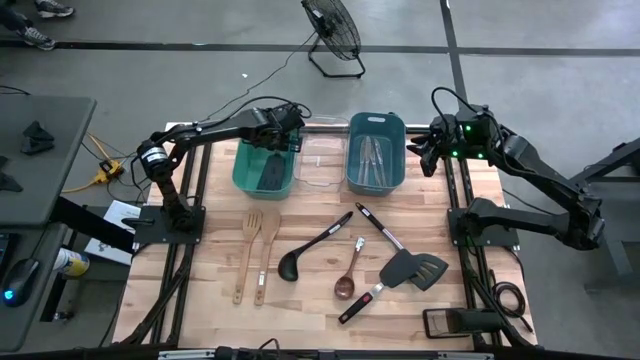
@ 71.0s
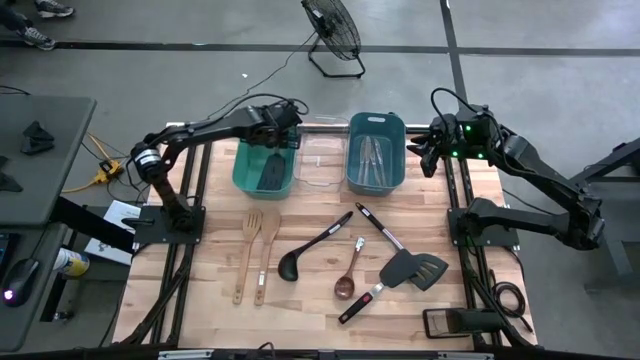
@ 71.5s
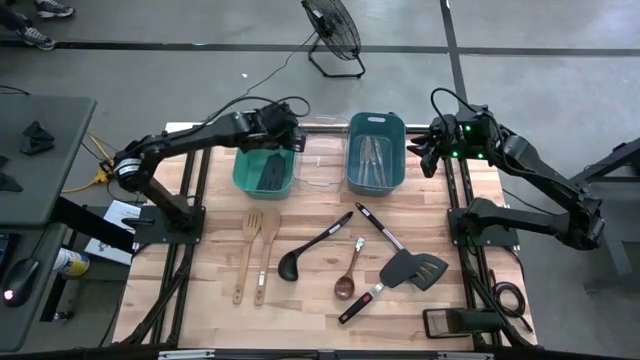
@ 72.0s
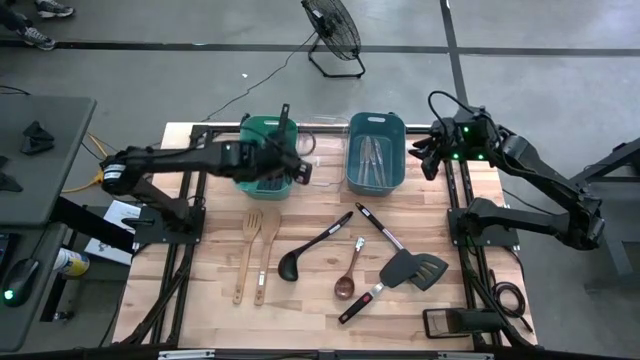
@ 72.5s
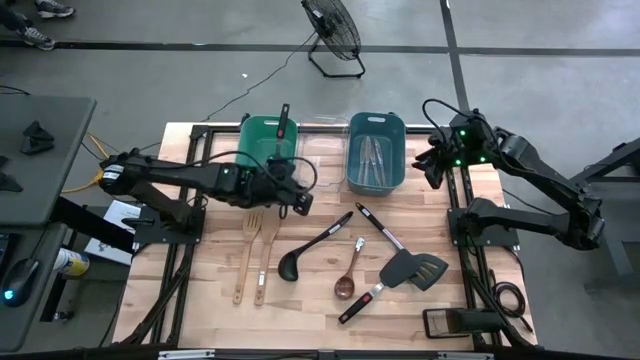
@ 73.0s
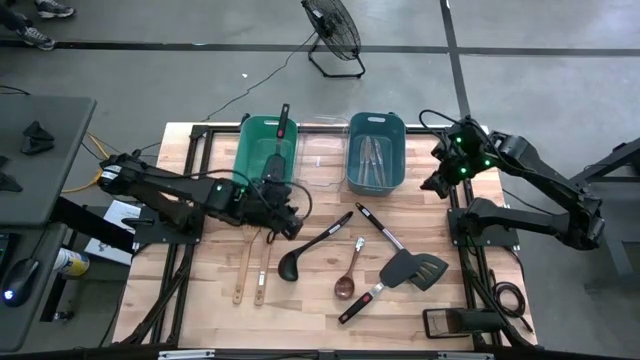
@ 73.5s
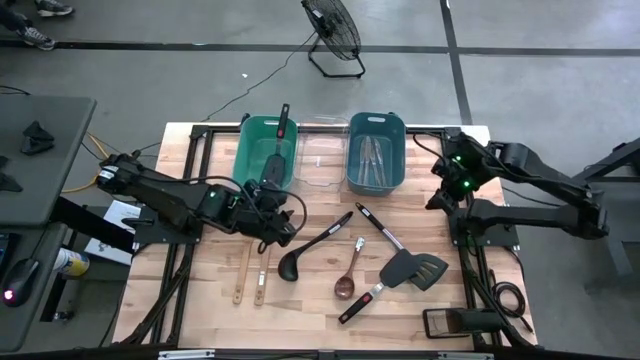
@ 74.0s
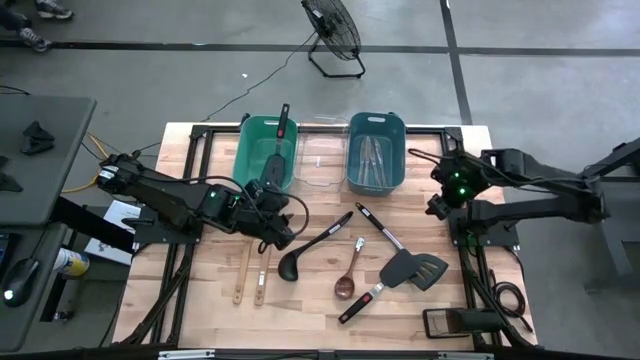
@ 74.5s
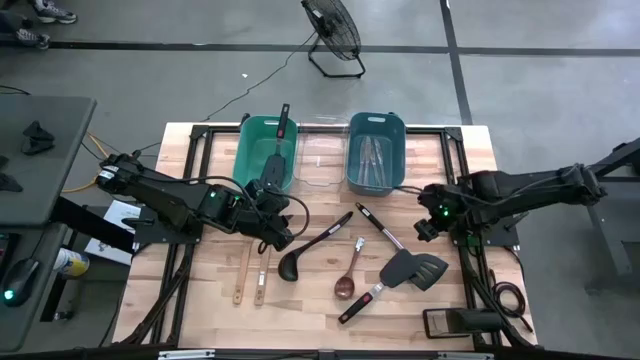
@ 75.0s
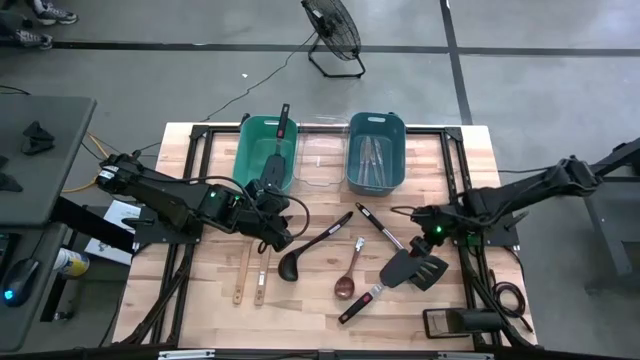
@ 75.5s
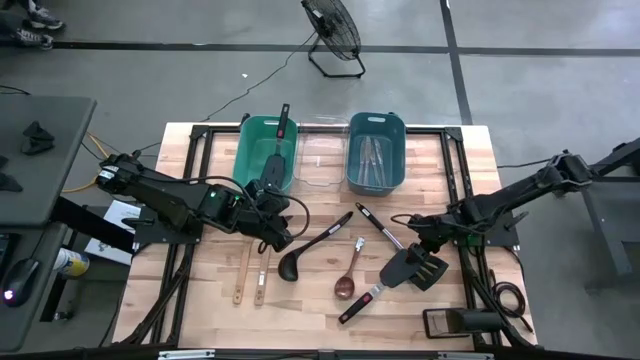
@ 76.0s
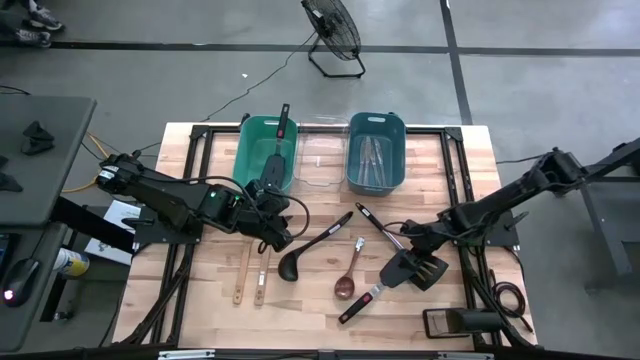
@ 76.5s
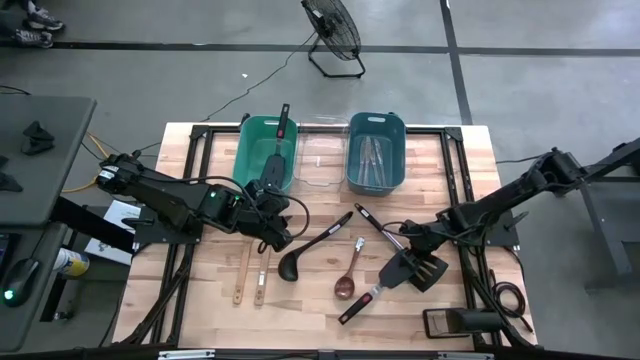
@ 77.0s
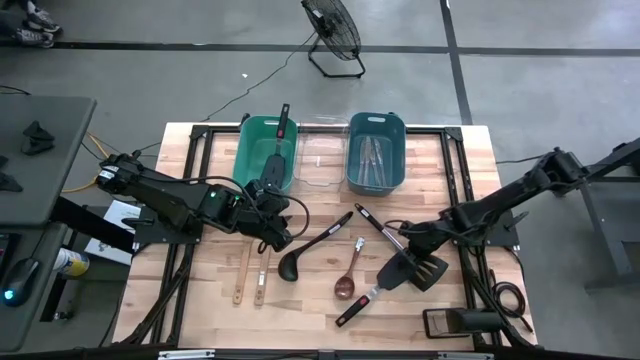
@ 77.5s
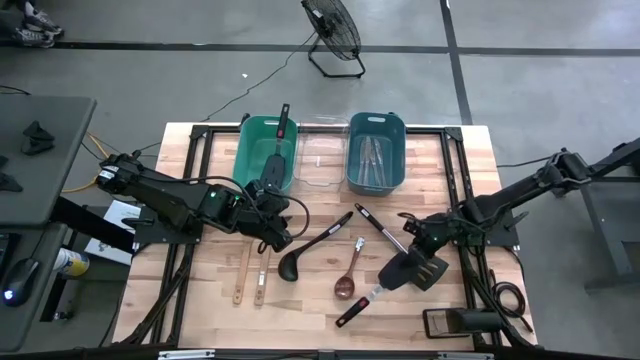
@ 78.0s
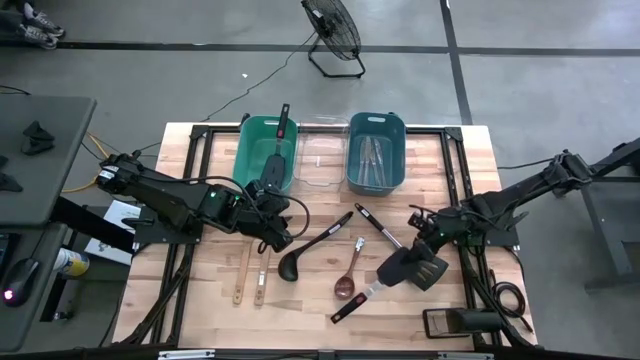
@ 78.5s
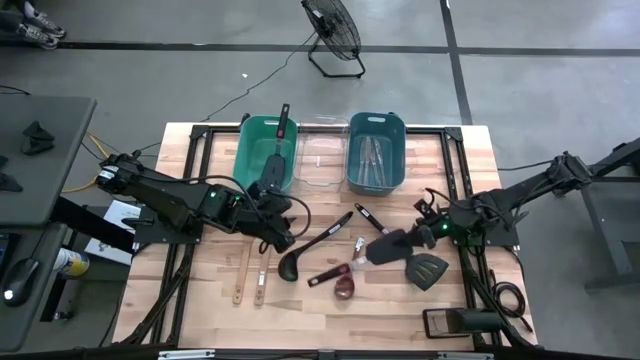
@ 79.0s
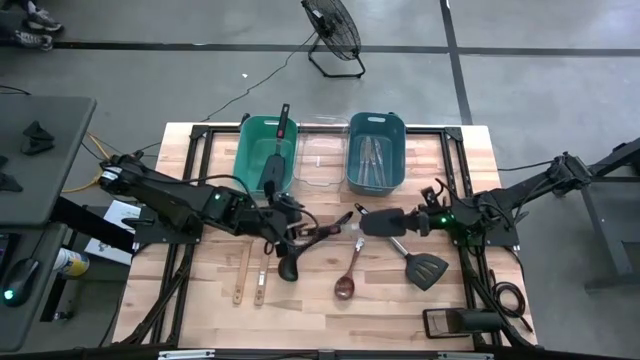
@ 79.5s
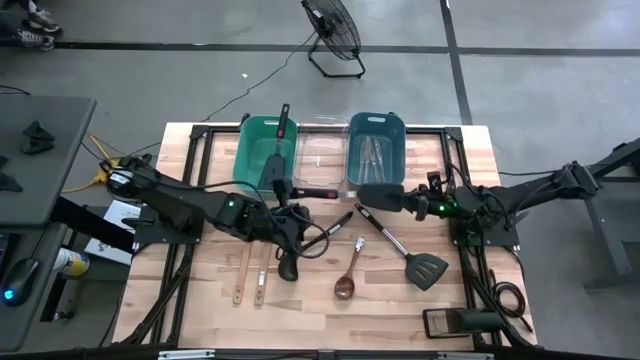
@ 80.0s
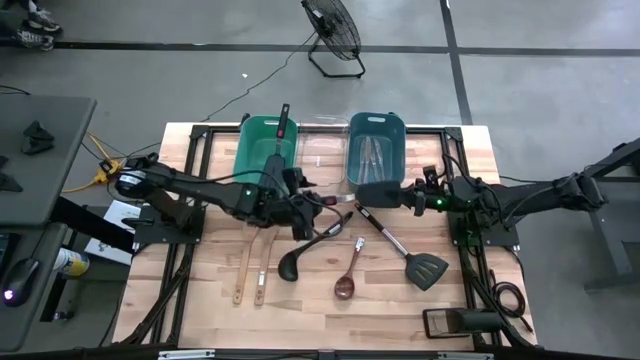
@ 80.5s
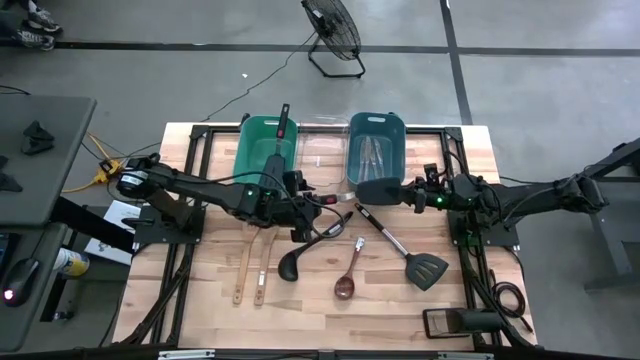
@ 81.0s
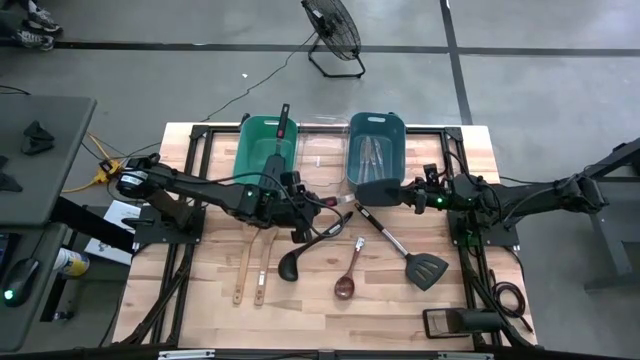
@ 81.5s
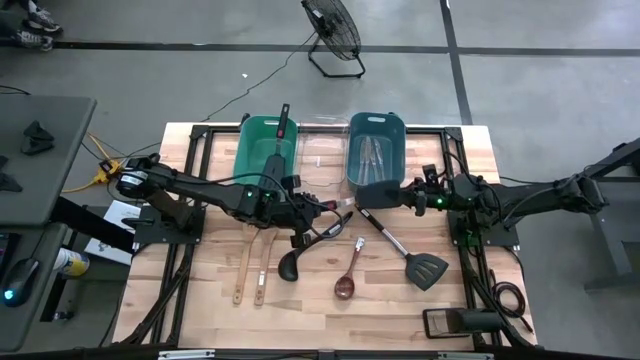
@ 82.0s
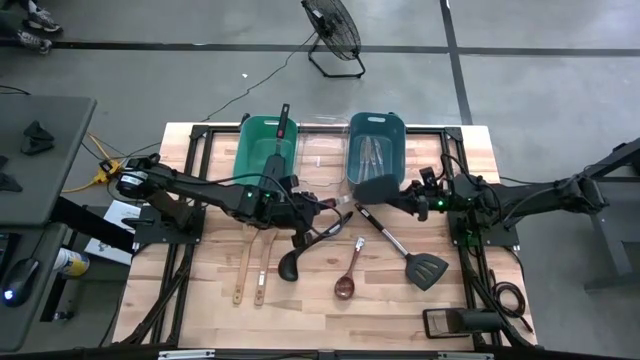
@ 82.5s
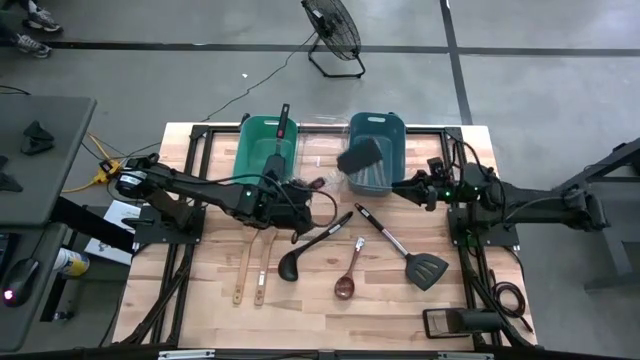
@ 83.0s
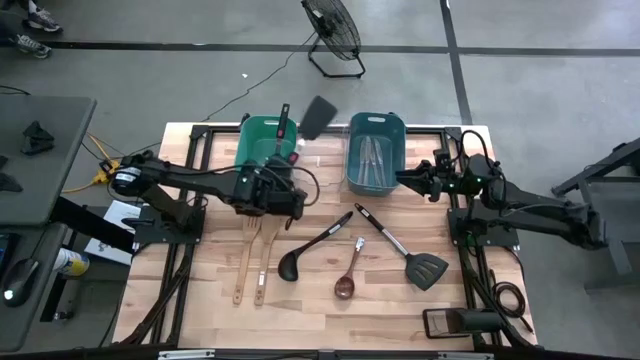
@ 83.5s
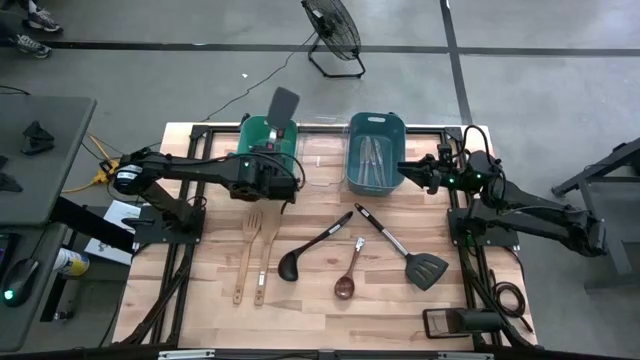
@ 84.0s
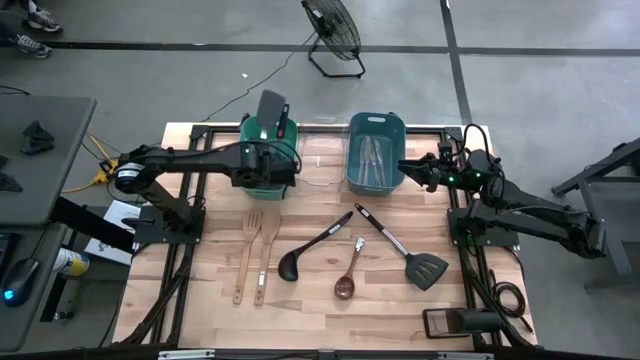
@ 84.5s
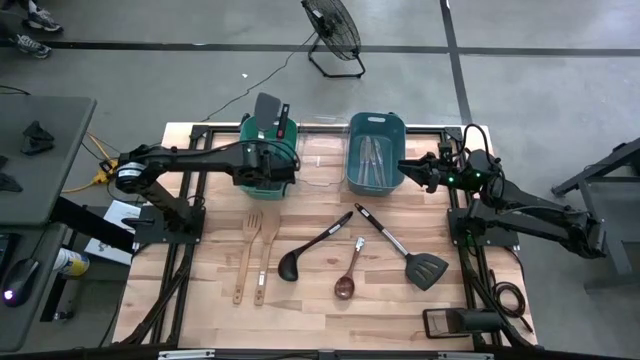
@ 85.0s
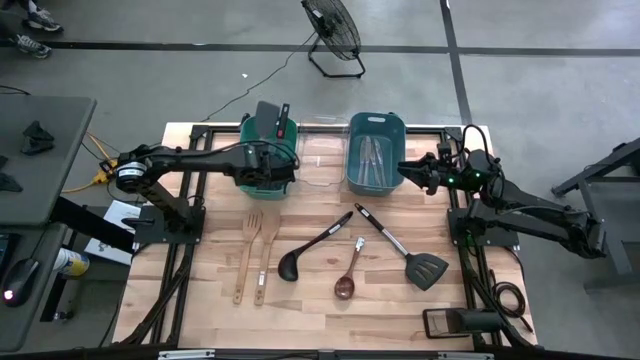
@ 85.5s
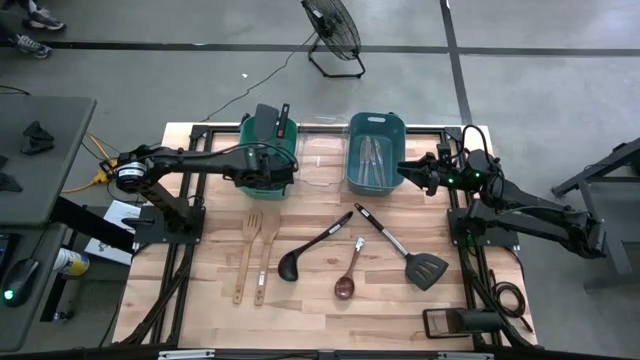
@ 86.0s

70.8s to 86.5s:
Task: Pick & Place Kitchen Items
Put the black spatula into the green bin
